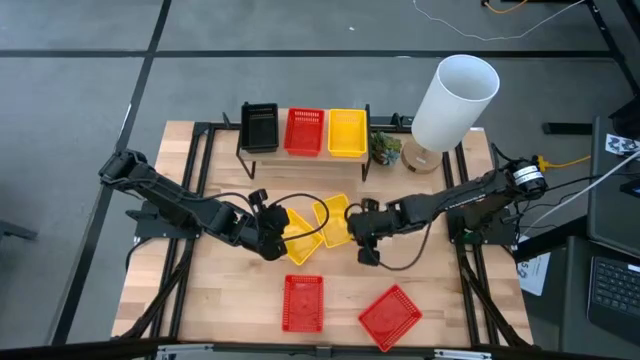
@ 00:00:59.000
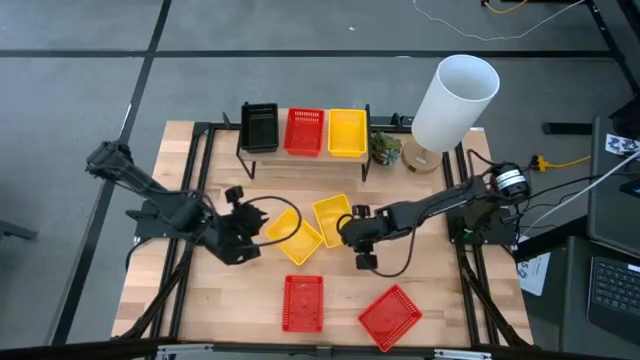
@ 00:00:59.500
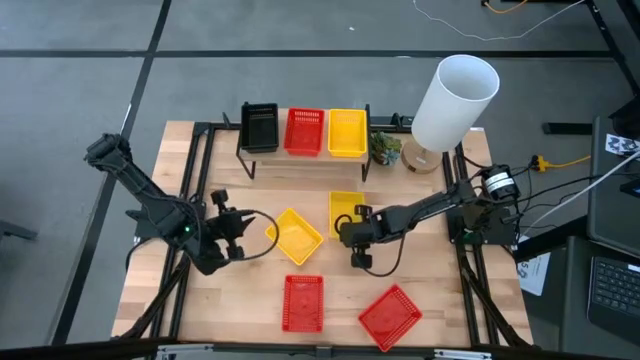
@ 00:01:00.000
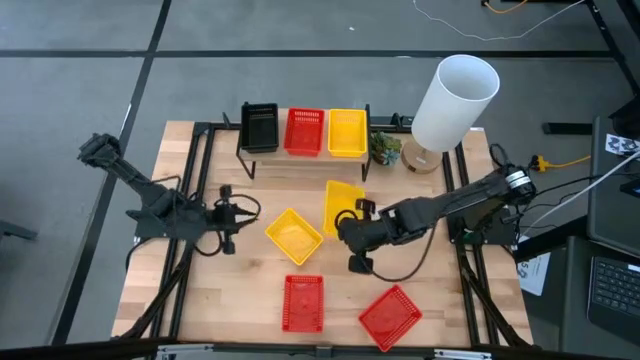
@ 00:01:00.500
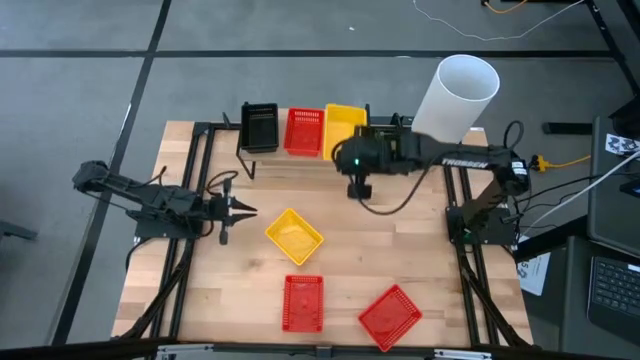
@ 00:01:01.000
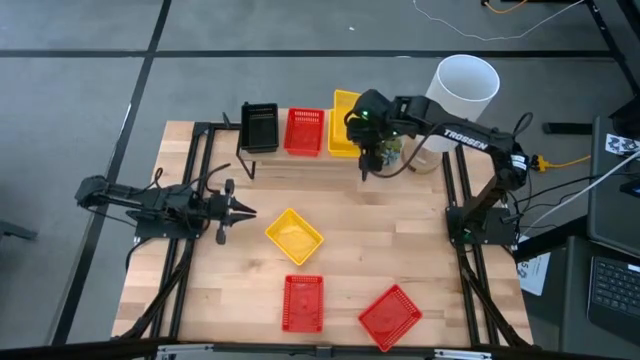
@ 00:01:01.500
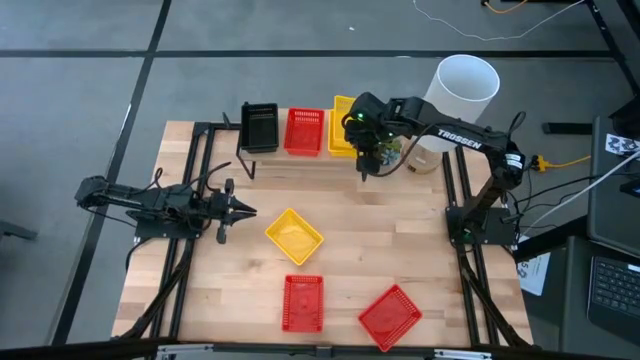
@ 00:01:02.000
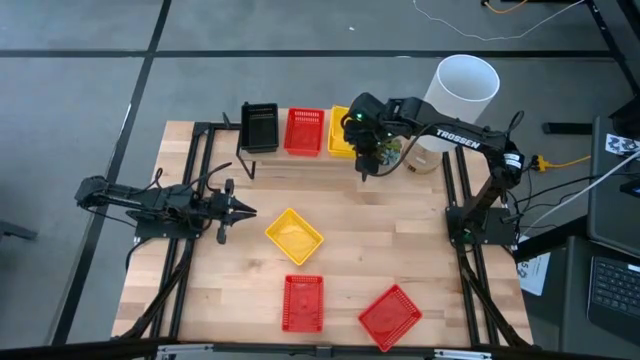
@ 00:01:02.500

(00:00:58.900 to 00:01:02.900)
Task: Stack baskets on shelf by color
Stack the right yellow bin on the other yellow bin on the shelf

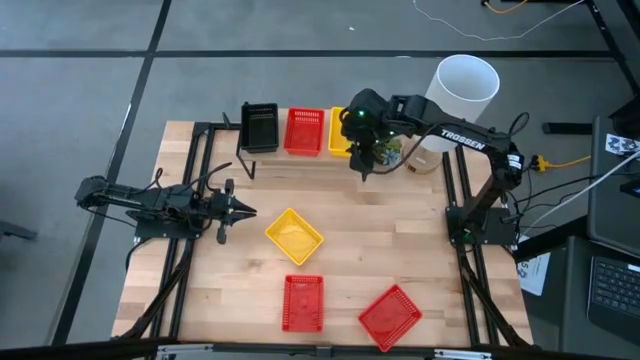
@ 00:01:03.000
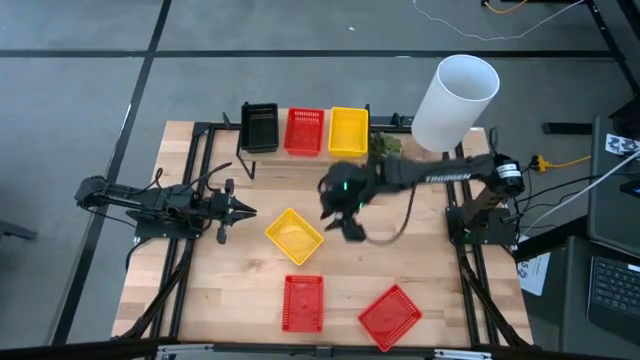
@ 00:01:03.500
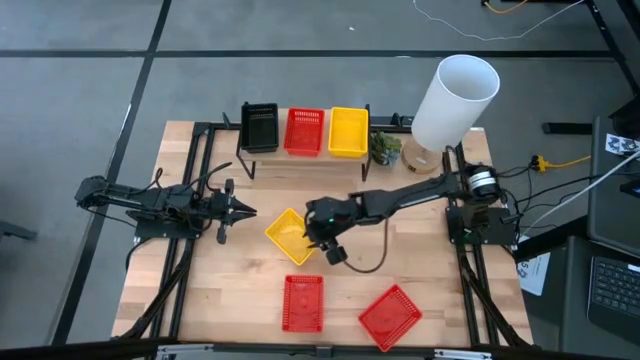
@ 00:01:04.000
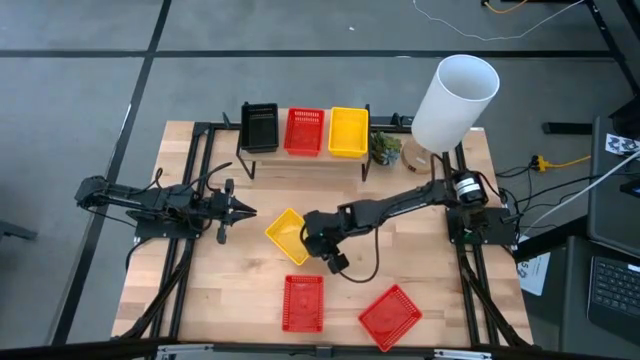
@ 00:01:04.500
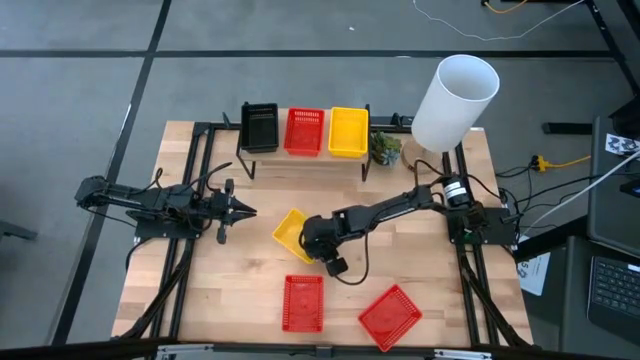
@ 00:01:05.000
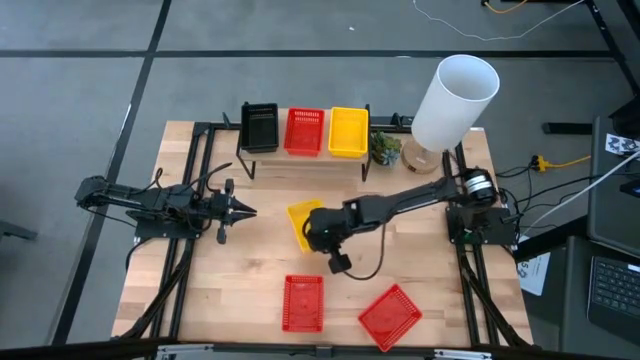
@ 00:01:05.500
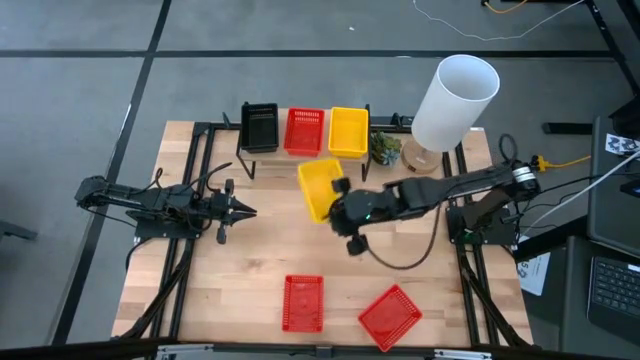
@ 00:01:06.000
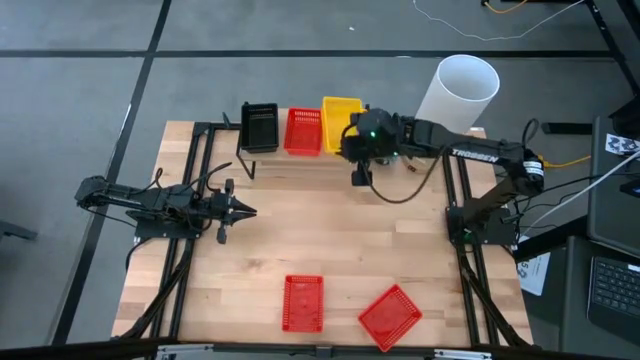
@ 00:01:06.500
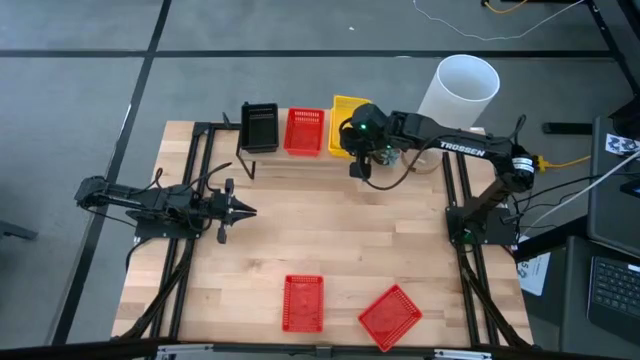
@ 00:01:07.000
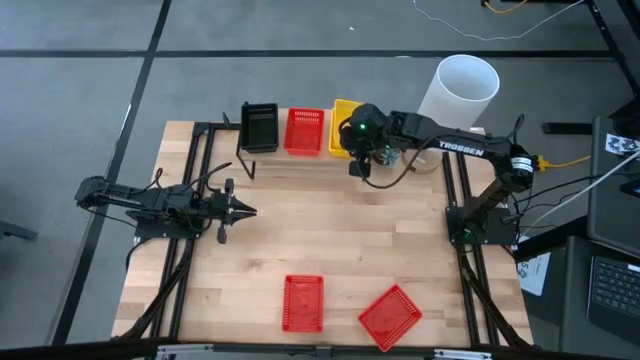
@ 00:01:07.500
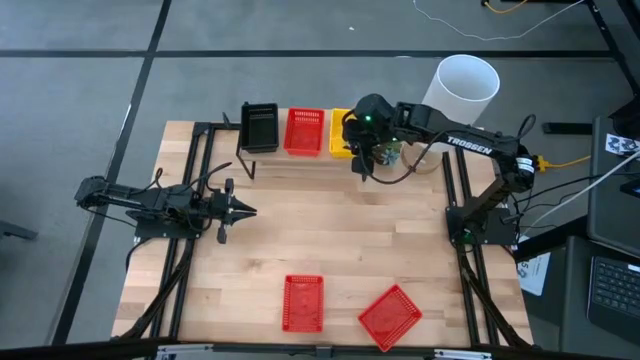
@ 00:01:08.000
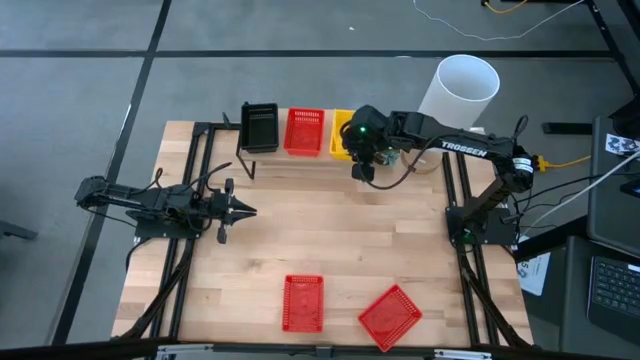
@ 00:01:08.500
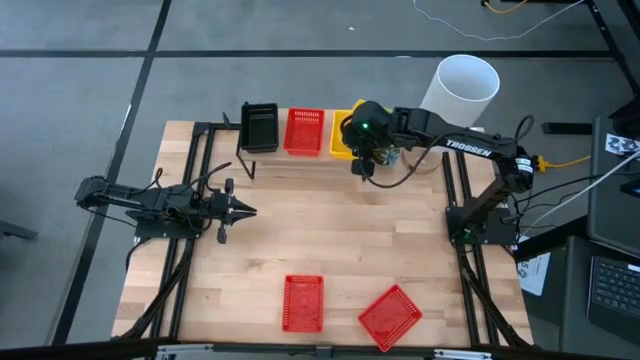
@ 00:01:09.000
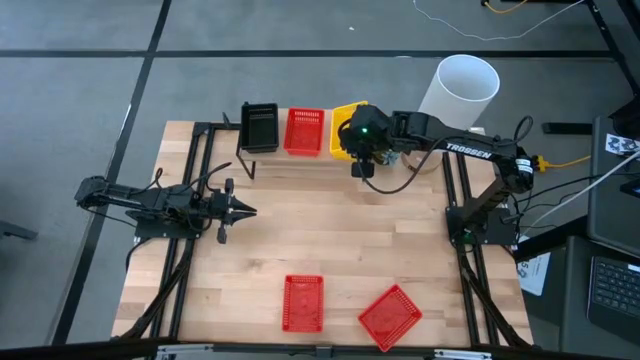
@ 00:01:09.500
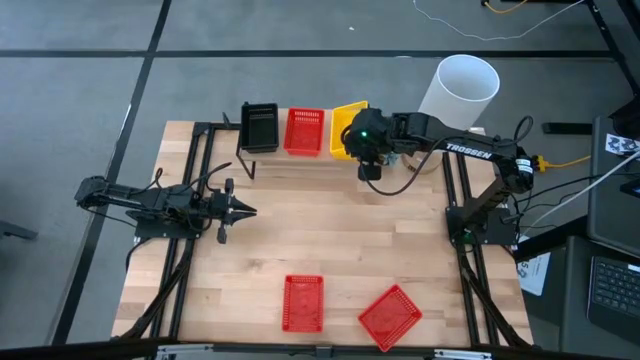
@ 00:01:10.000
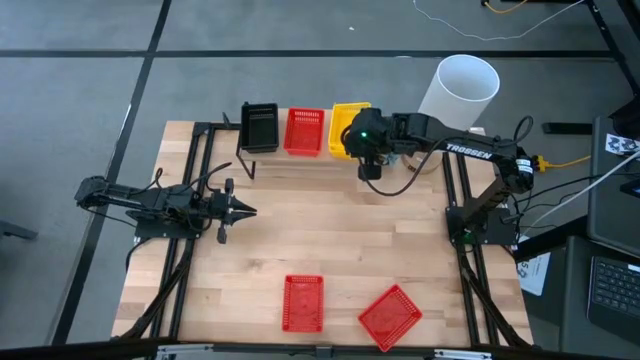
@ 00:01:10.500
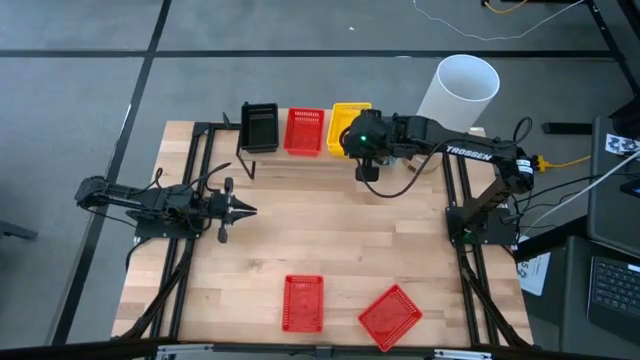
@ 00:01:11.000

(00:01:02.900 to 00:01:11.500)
Stack the yellow bin on the other yellow bin on the shelf

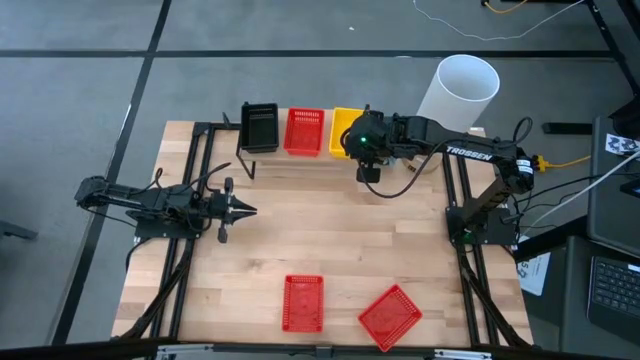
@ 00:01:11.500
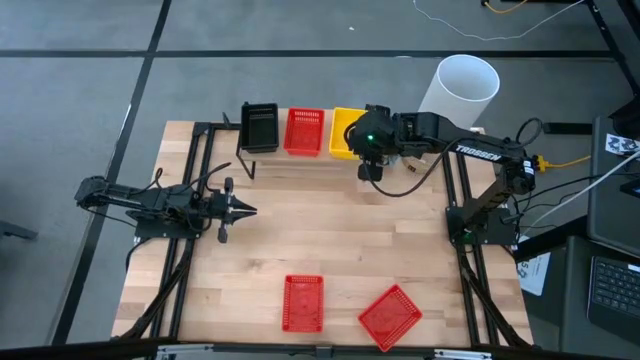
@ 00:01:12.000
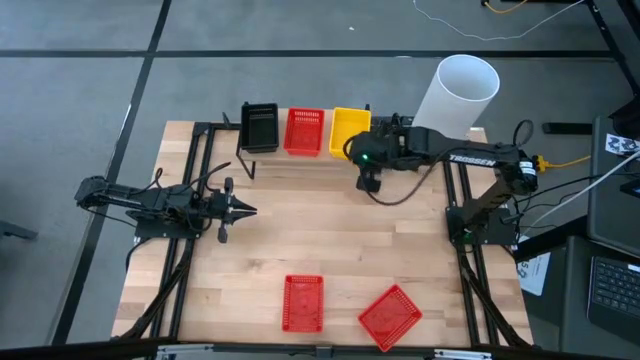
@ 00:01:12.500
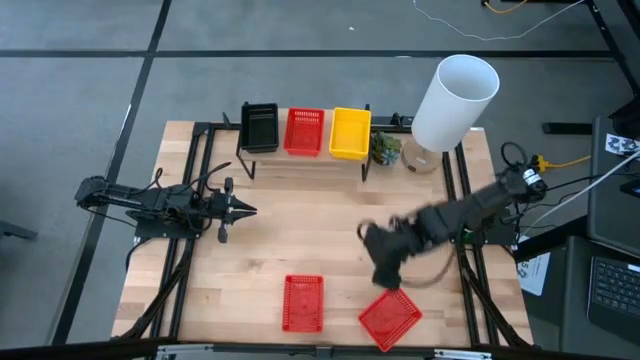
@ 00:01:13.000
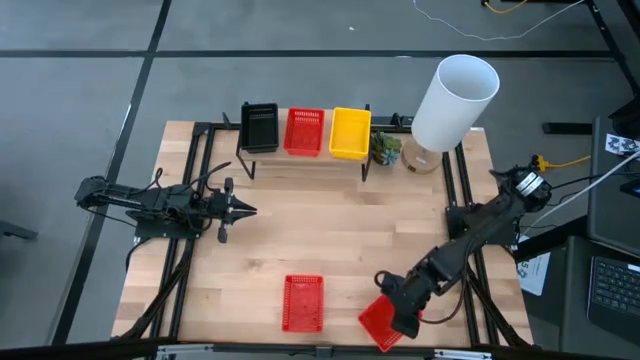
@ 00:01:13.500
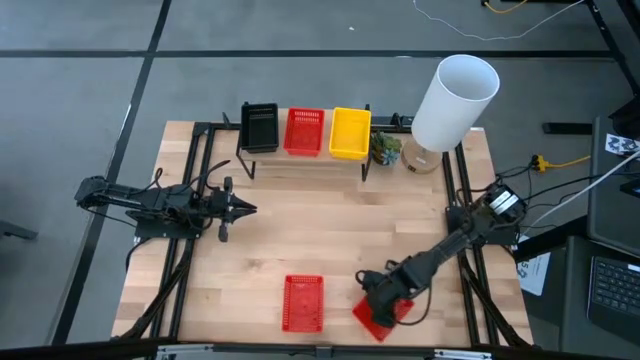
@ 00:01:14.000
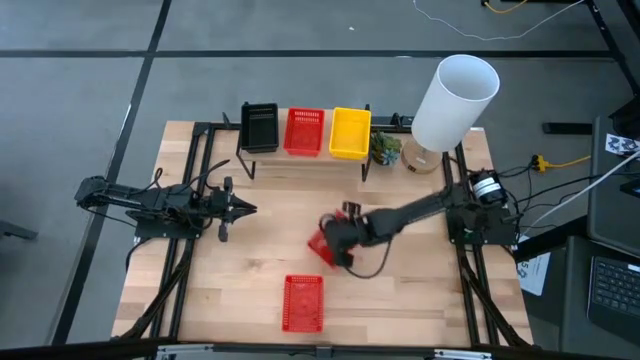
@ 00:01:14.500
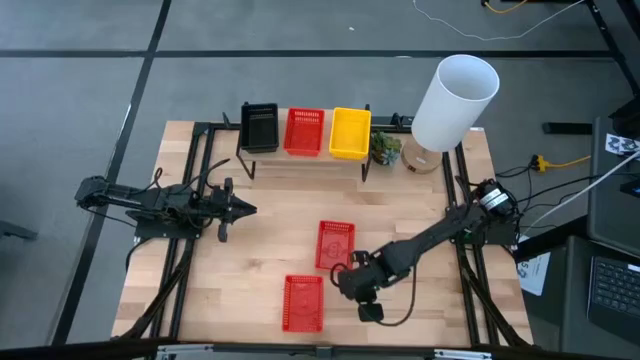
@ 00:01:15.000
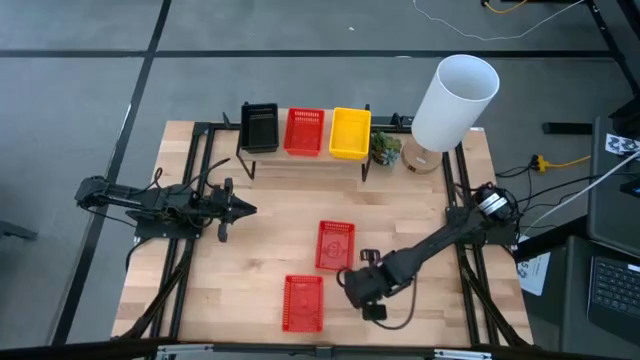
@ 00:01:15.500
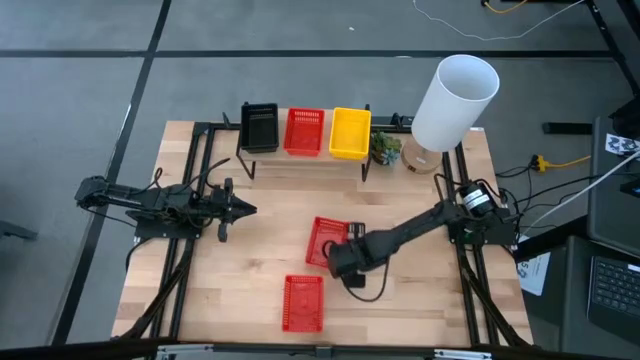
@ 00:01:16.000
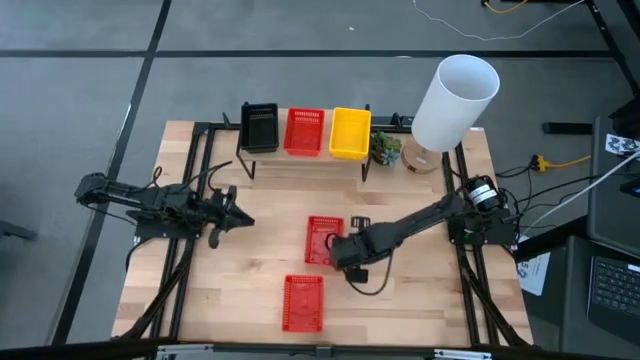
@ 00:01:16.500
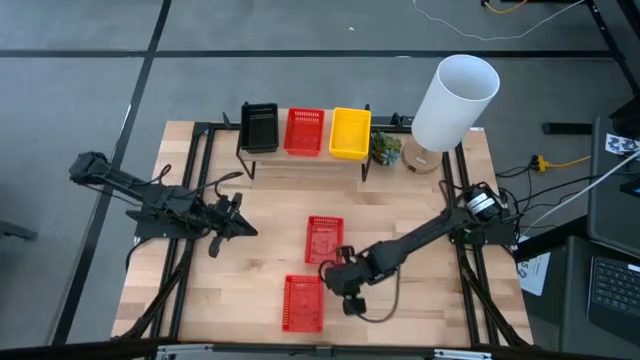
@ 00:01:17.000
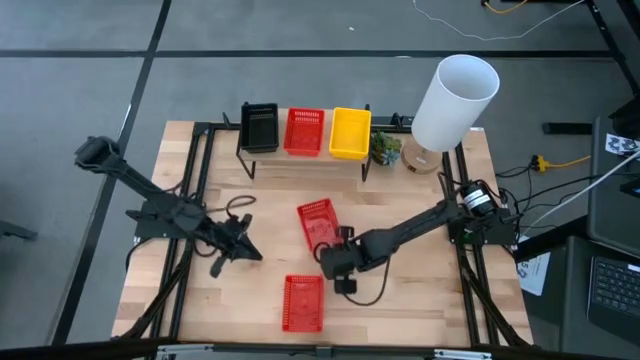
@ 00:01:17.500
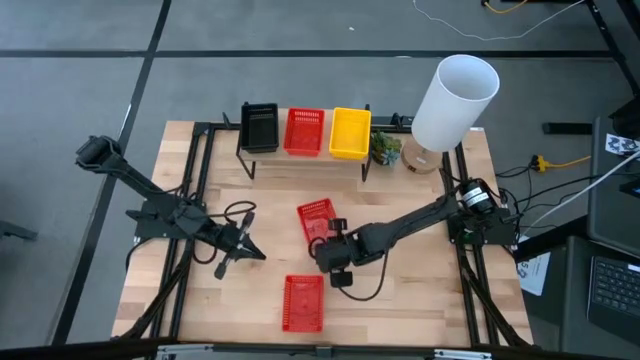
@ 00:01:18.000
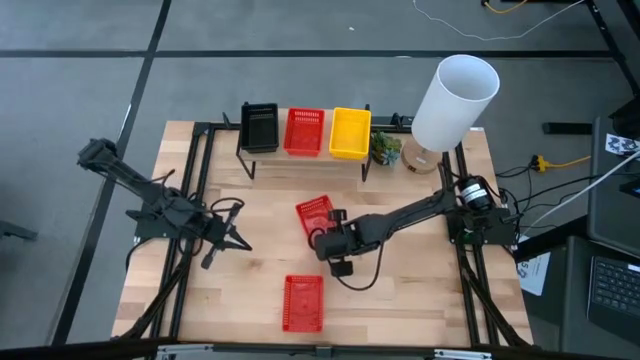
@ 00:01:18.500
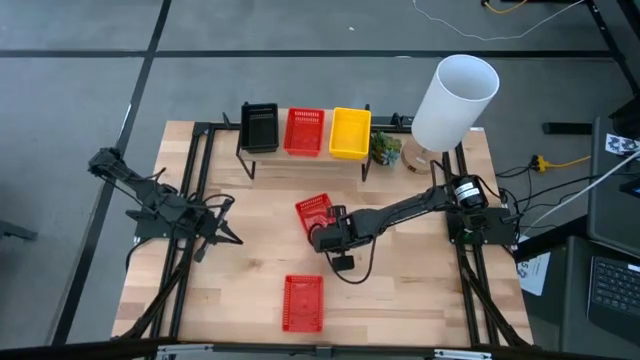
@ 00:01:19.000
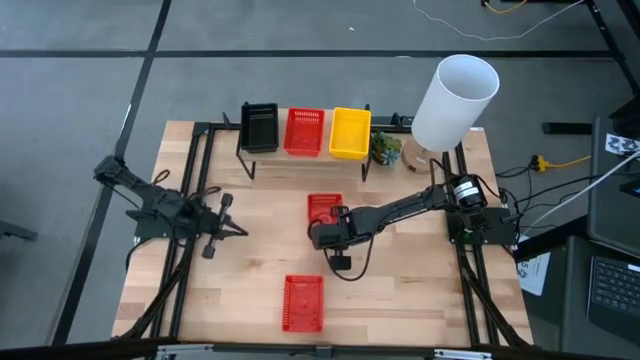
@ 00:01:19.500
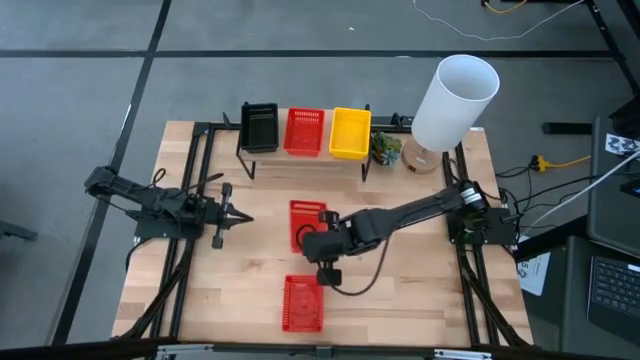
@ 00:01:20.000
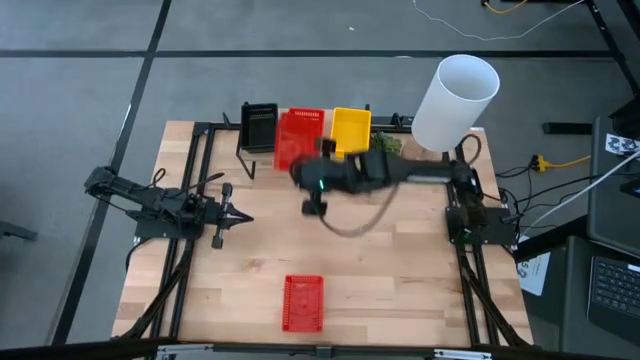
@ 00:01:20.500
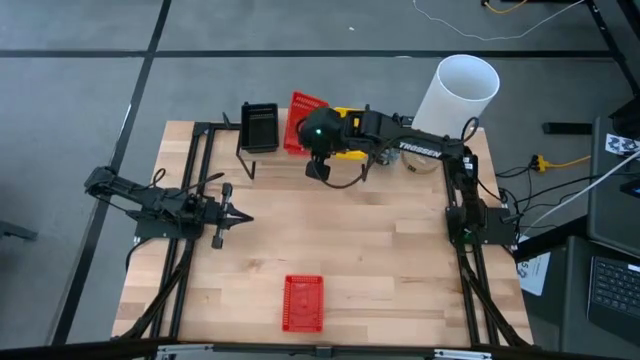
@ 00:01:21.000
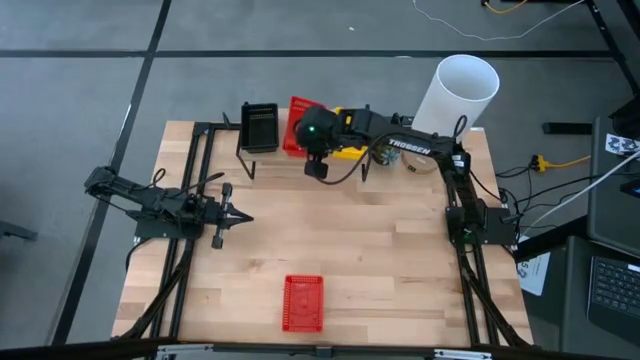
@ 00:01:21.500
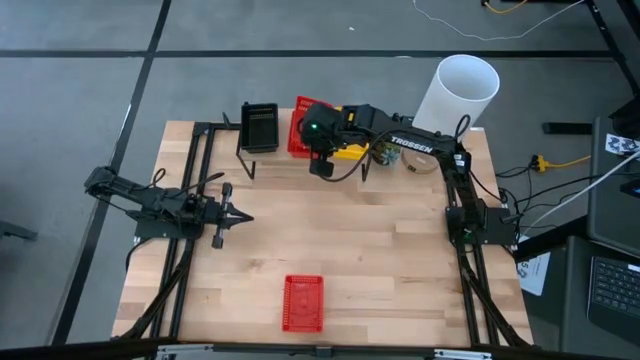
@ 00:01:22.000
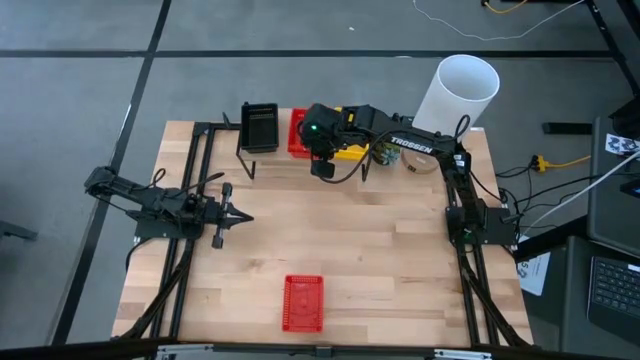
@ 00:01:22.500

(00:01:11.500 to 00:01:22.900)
Stack the right red bin on the other red bin on the shelf
